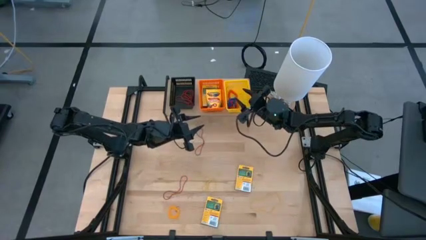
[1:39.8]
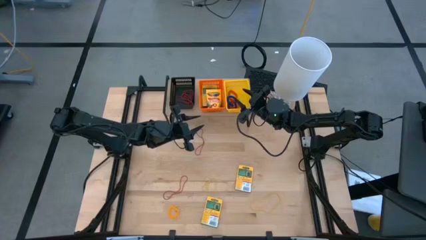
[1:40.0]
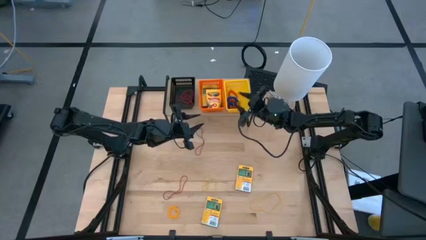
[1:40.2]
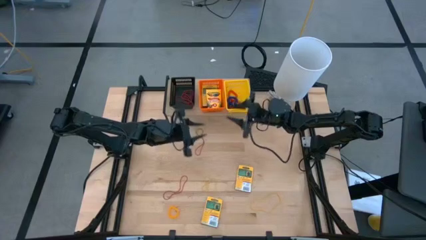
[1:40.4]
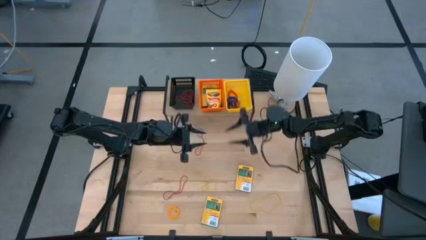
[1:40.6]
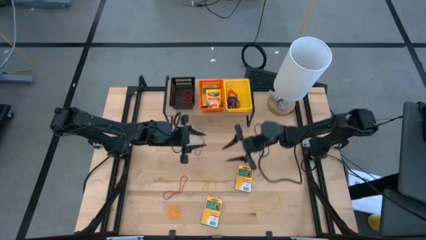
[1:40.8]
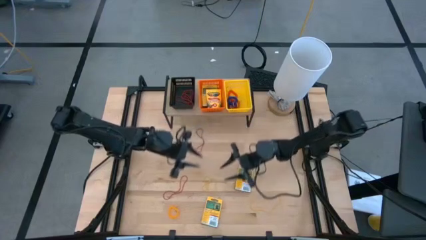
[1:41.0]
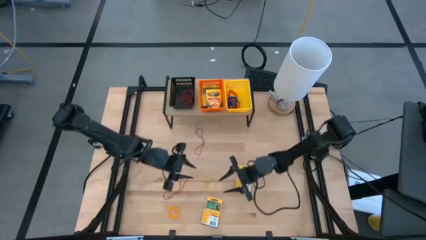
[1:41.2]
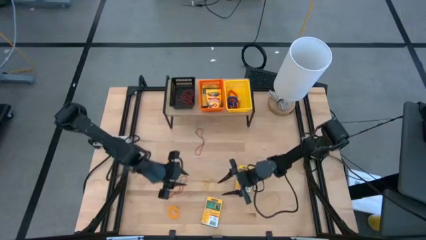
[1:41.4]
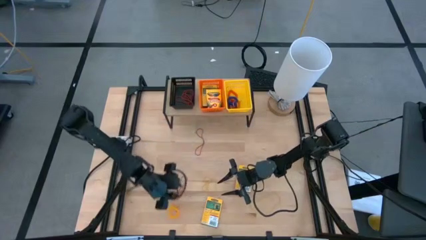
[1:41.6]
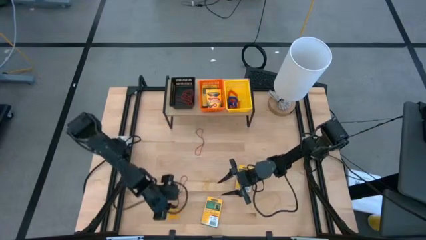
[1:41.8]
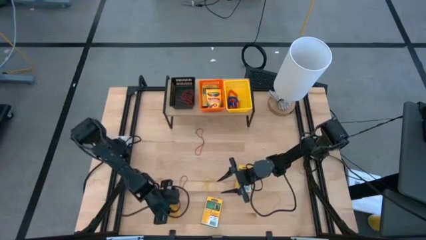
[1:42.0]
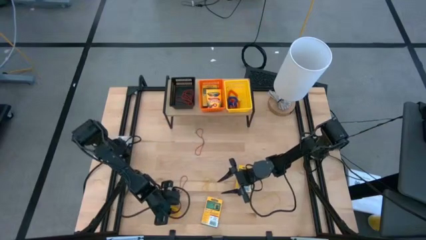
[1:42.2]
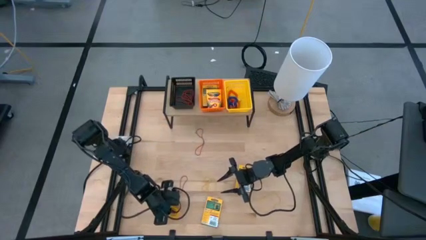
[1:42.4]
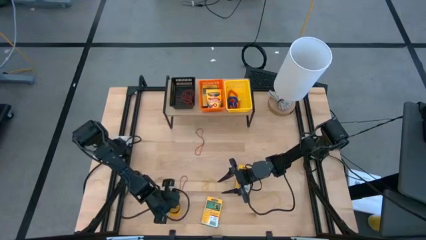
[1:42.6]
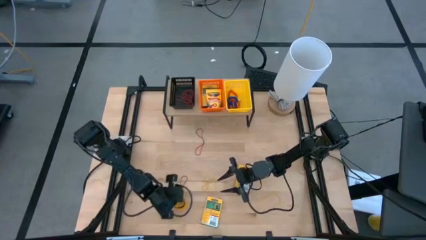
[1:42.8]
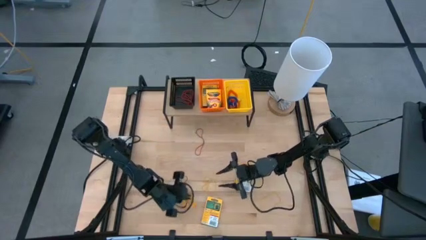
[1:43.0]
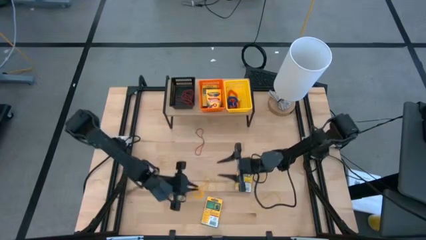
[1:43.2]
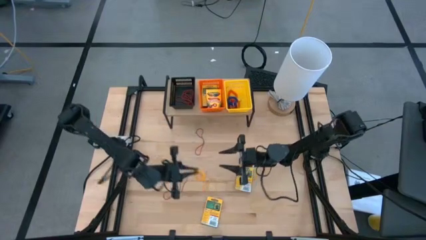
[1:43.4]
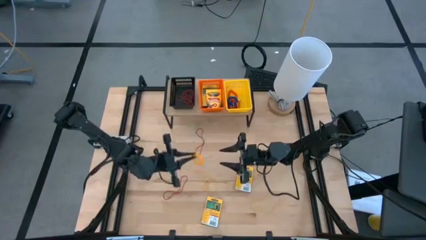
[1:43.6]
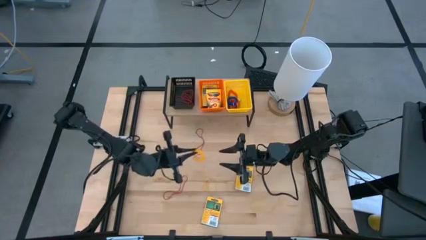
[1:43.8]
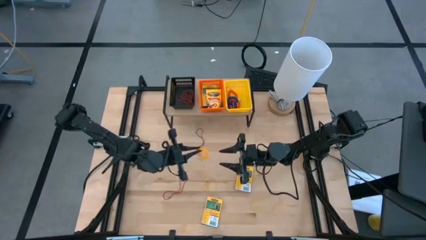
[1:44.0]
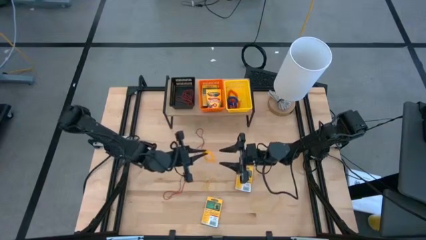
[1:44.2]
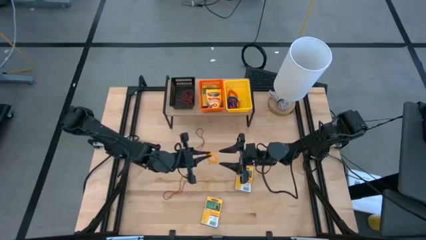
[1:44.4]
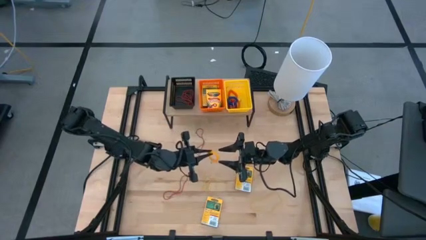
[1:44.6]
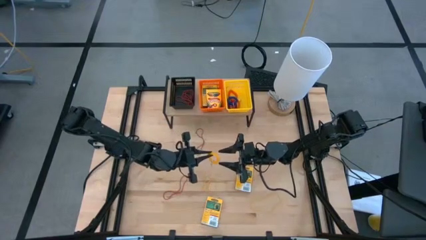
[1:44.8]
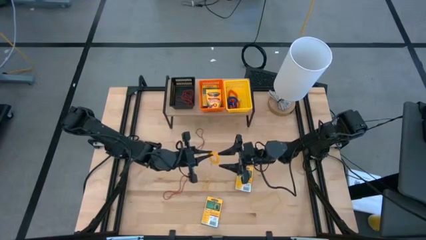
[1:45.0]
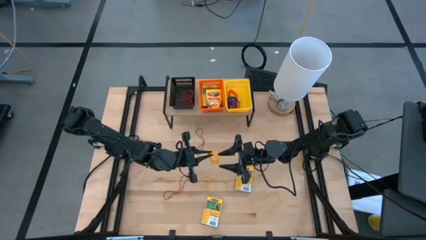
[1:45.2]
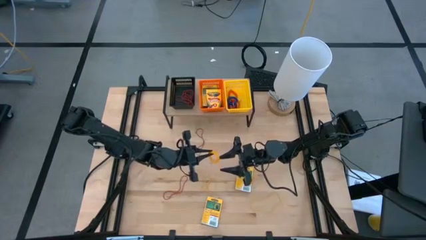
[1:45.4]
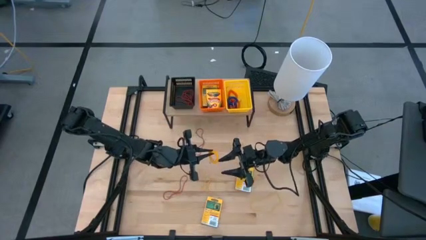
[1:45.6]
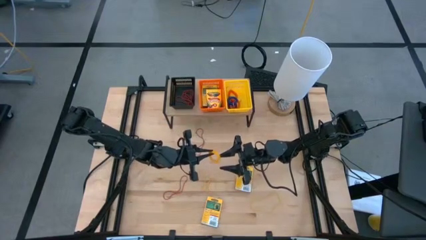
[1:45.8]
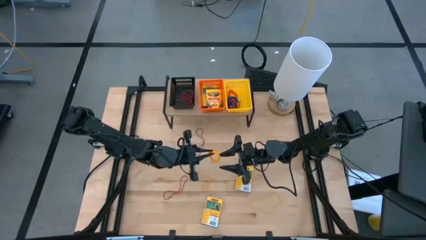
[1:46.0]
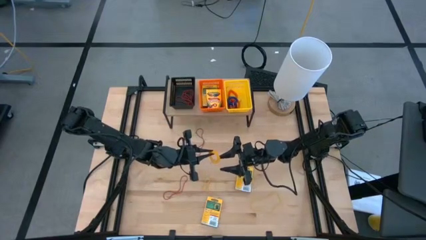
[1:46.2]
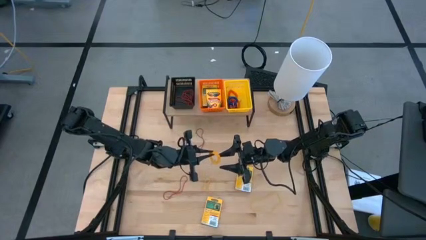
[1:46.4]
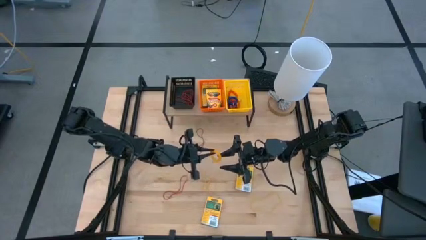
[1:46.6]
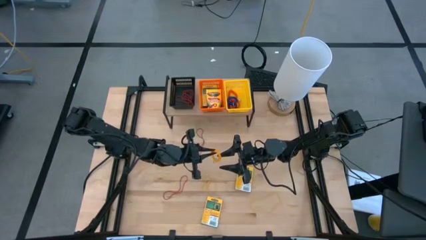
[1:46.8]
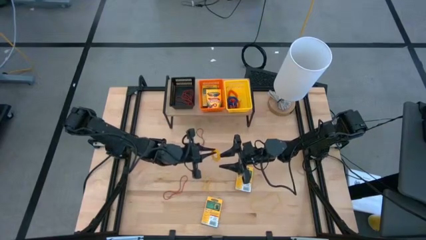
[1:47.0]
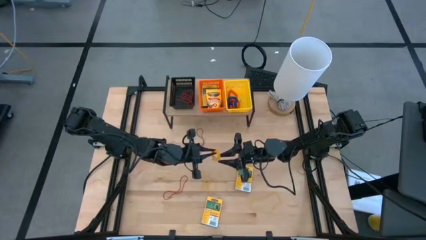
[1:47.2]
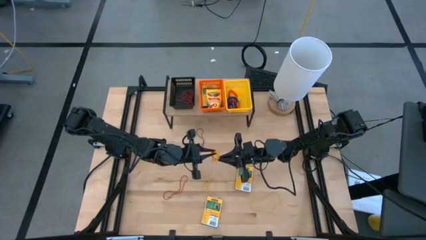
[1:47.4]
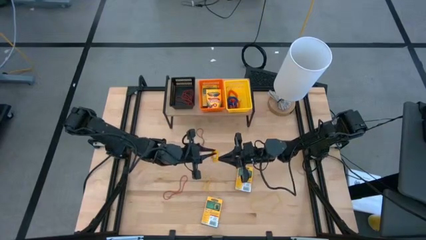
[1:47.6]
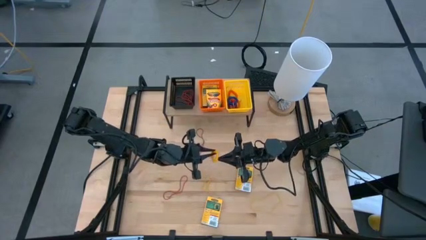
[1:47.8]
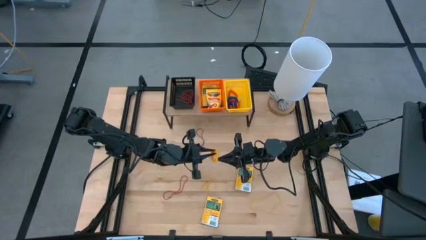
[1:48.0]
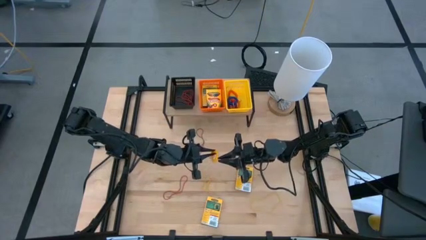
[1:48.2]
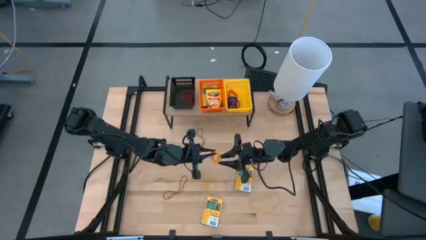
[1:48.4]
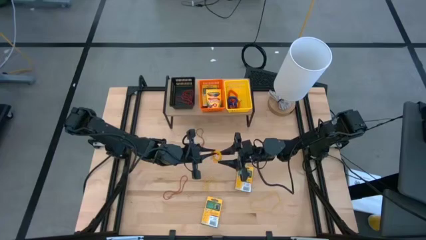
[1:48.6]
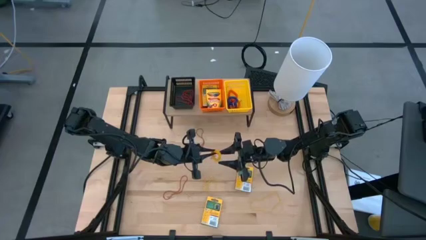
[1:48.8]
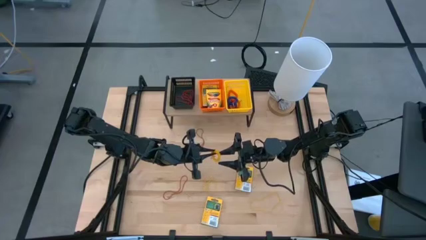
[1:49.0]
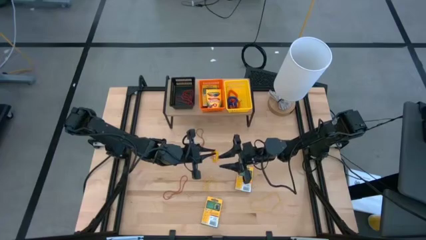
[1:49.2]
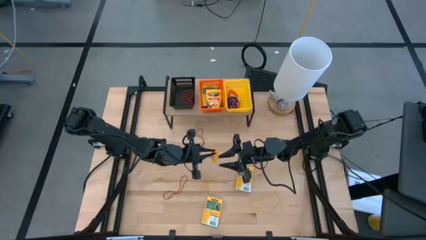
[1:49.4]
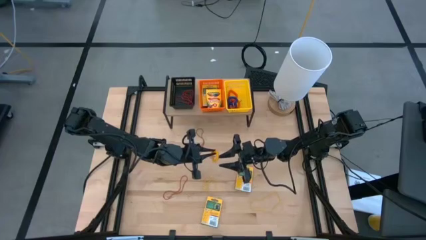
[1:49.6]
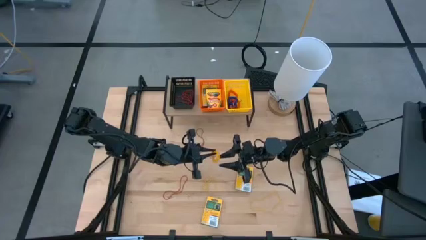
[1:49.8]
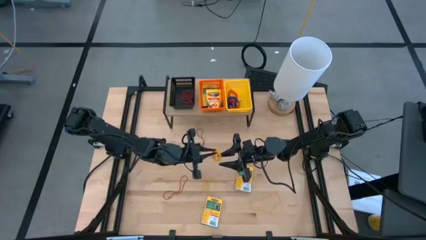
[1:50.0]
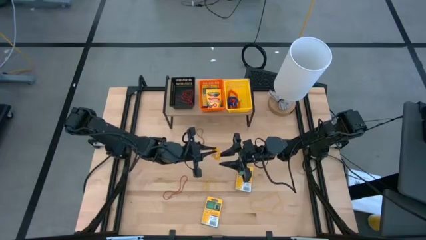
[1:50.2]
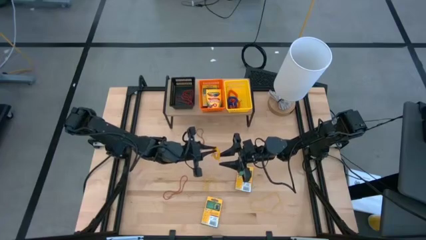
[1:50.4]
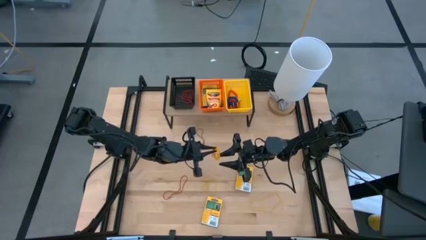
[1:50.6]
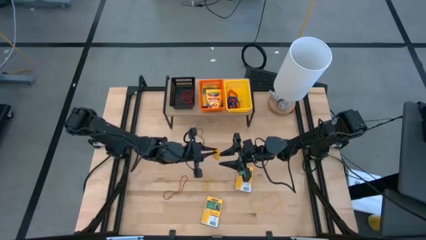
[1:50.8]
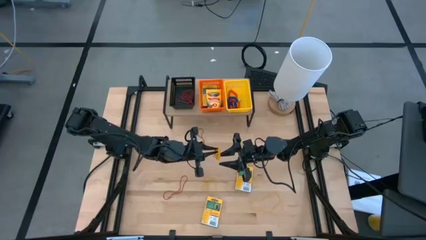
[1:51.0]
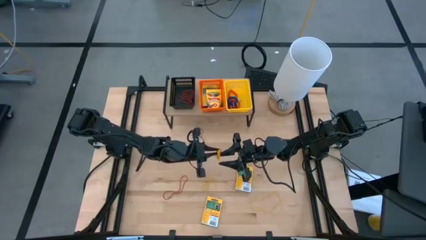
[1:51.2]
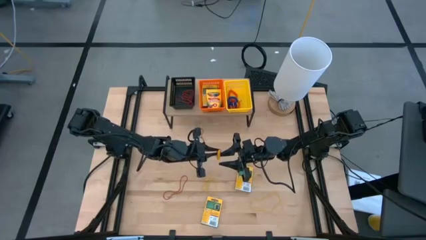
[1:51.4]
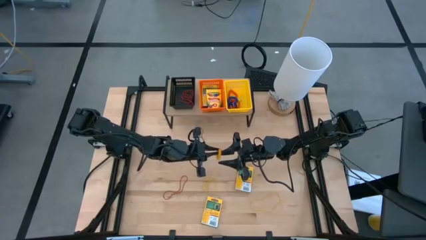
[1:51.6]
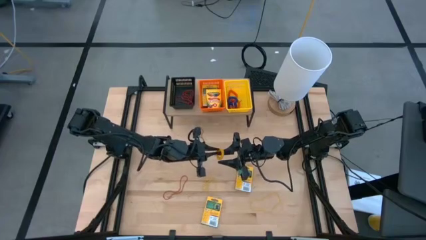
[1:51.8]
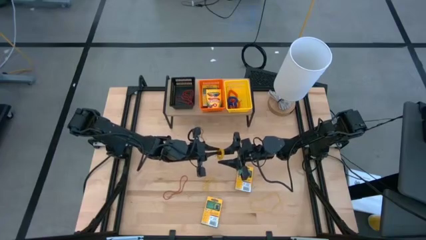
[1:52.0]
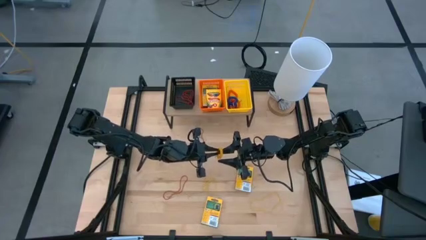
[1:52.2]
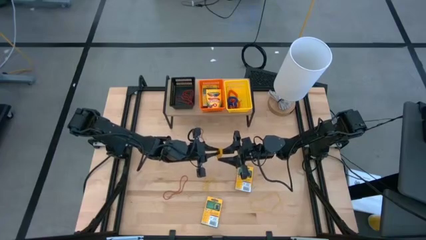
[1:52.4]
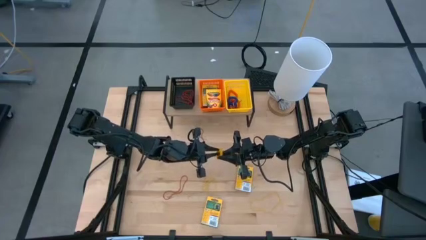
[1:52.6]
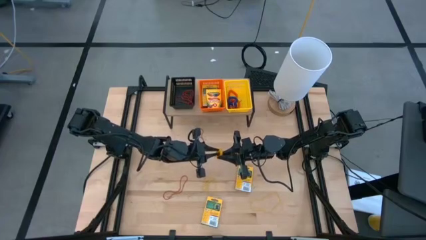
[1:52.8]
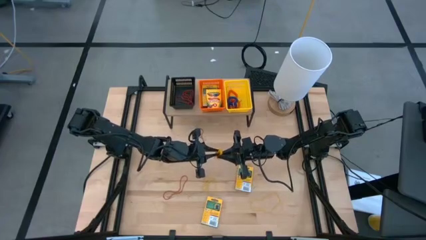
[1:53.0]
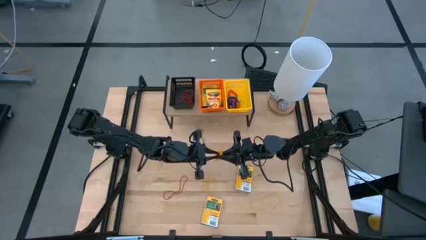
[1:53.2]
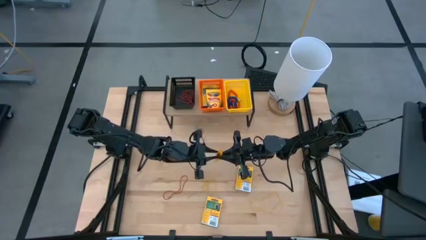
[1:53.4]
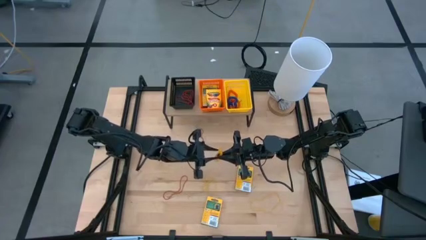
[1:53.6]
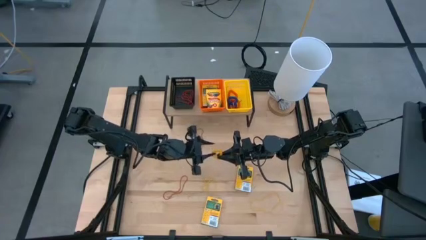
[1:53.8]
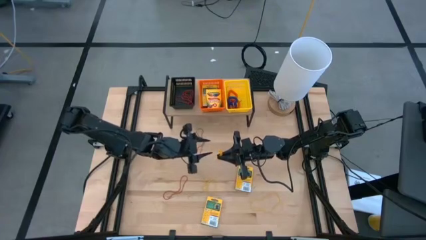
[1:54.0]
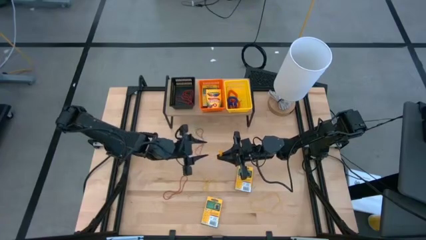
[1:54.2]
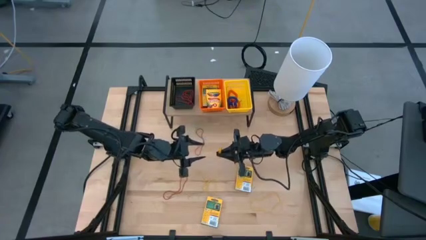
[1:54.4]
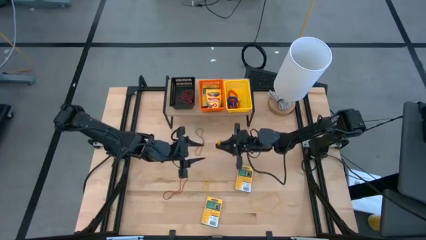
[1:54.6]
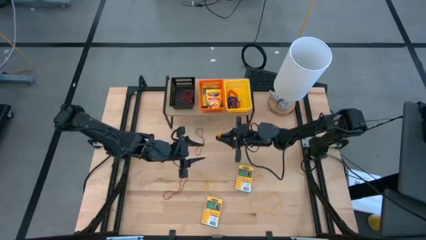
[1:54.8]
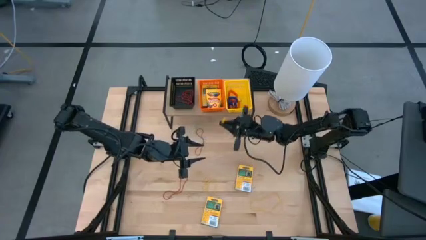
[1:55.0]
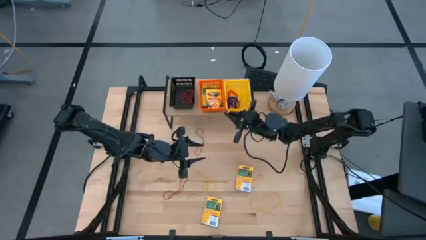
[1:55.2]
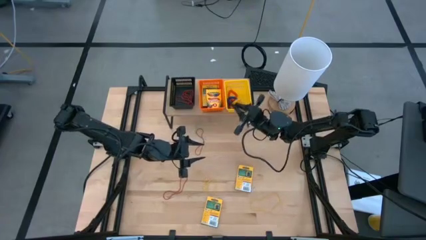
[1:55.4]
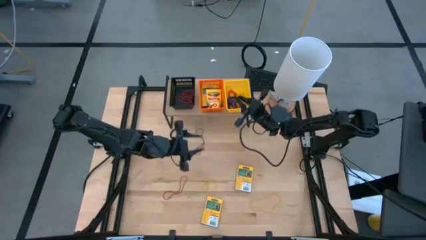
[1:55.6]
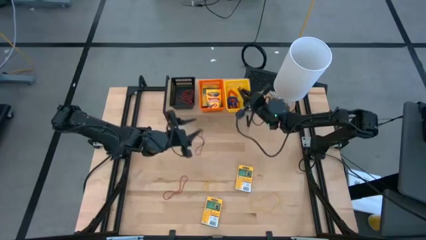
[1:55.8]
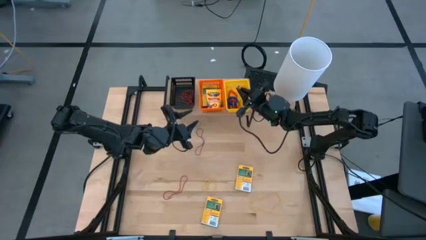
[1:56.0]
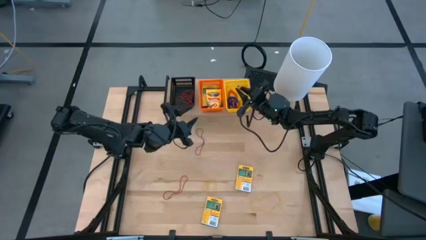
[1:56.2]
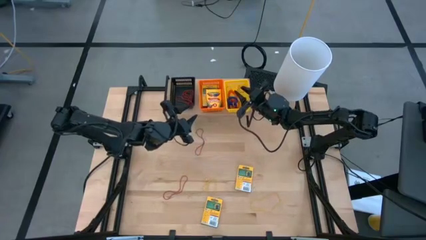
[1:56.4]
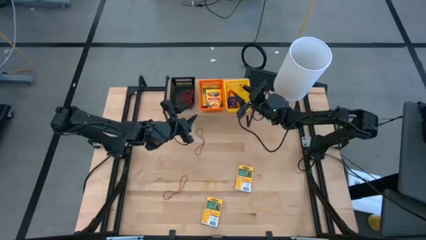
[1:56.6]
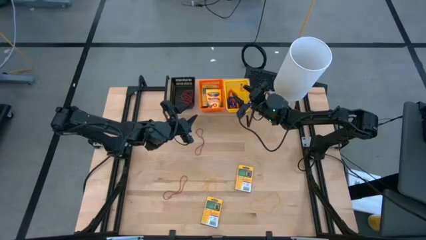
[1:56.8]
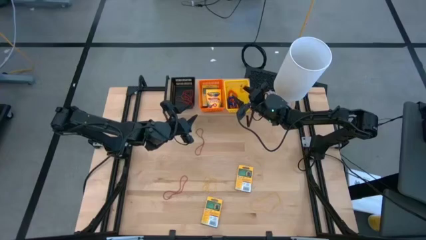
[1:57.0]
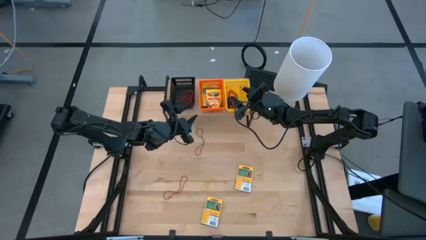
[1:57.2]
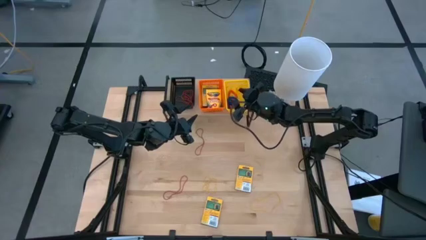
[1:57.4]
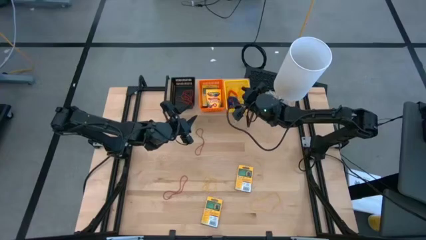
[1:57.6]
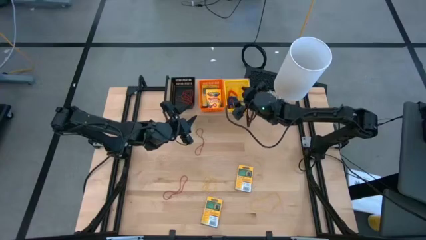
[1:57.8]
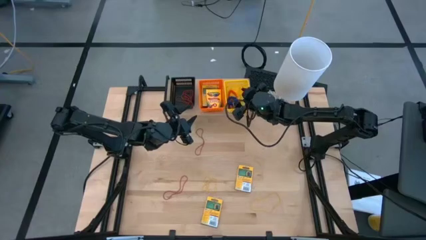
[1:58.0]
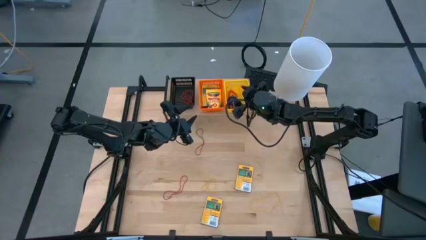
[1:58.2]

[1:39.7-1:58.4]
Task: Pick & Place Office Desk Supplies
Put the yellow spring keychain into the yellow bin on the shelf
